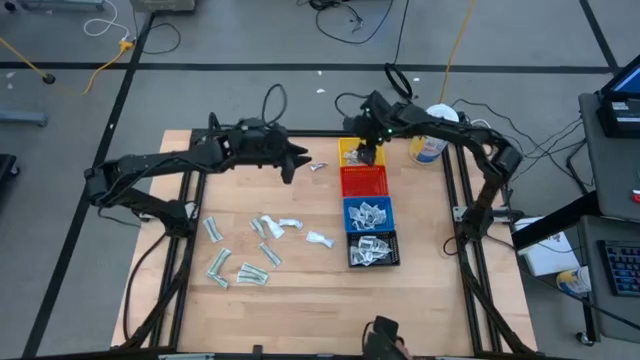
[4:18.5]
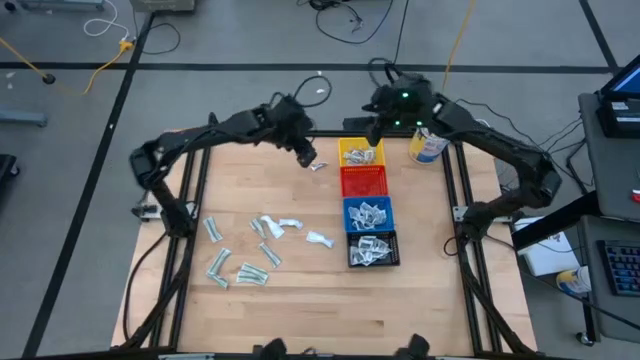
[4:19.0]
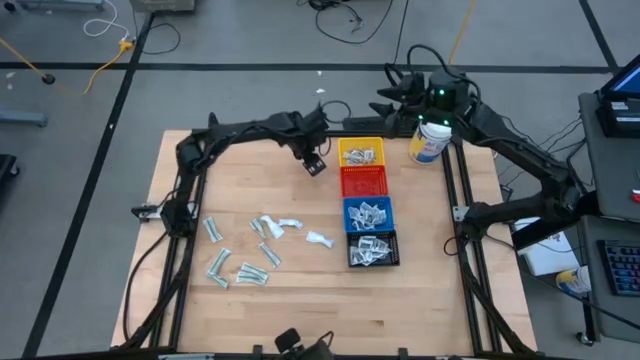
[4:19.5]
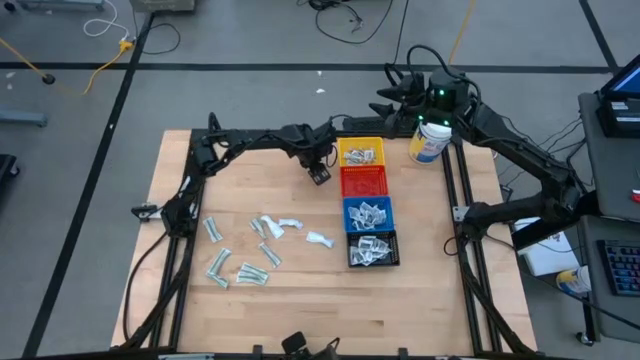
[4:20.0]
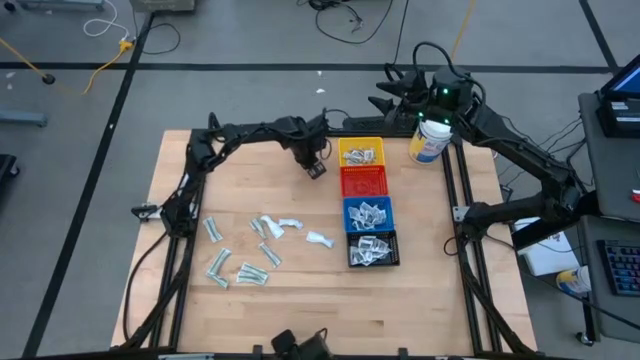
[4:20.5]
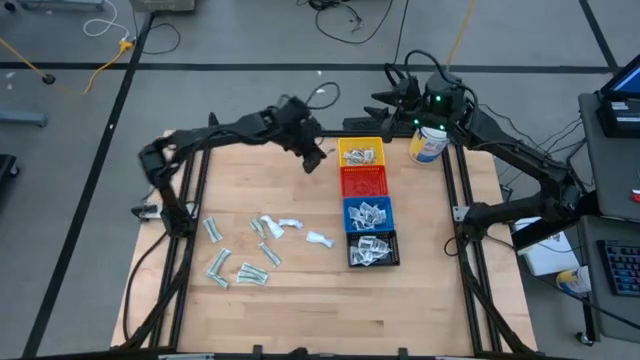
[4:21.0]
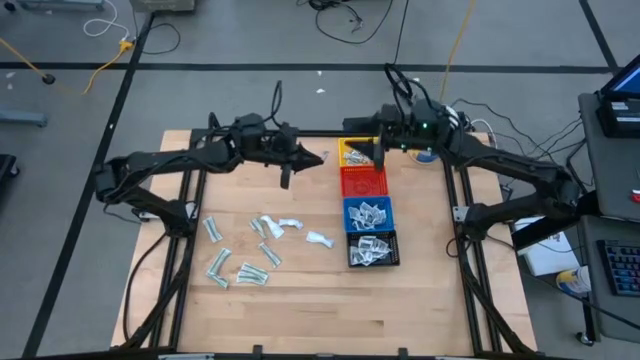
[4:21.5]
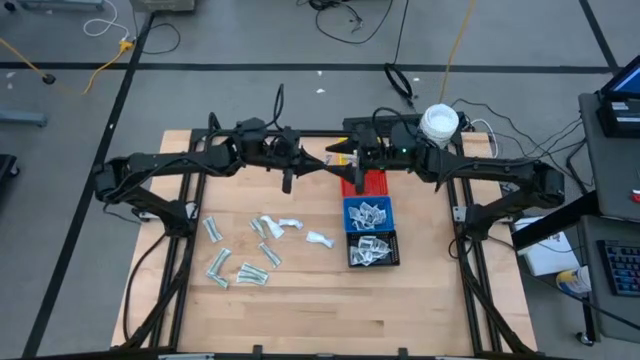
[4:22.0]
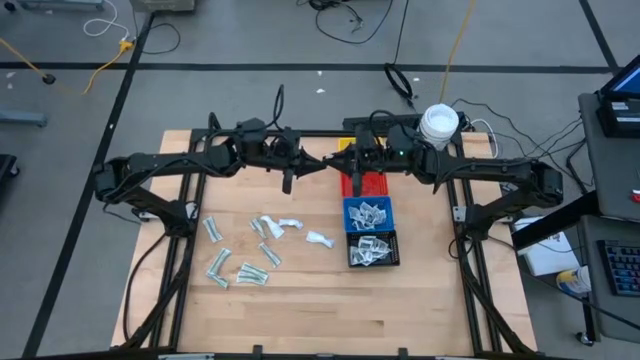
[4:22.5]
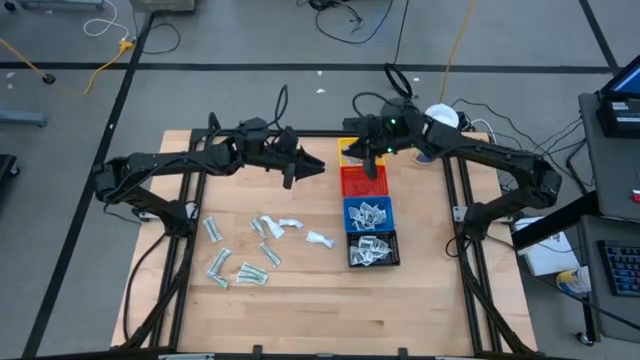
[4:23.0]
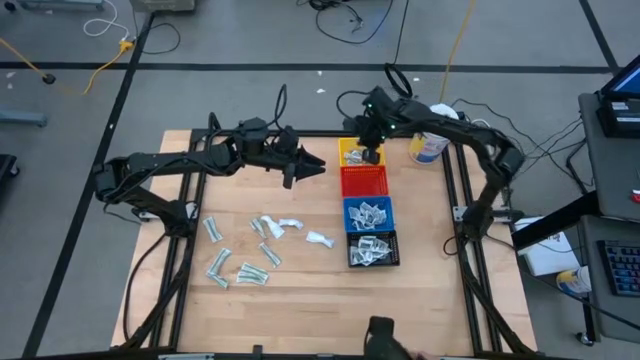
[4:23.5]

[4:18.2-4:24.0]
Task: Pick & Place First Aid Supplies
Put the orange ointment pack into the yellow bin

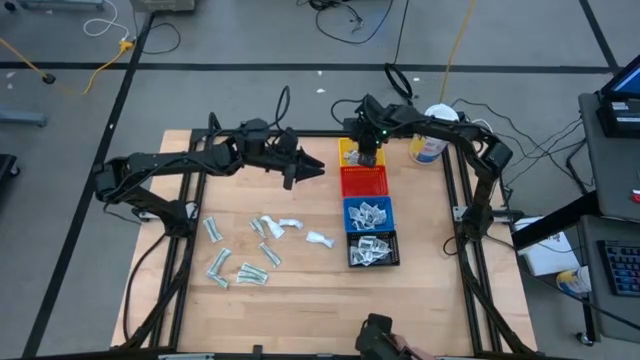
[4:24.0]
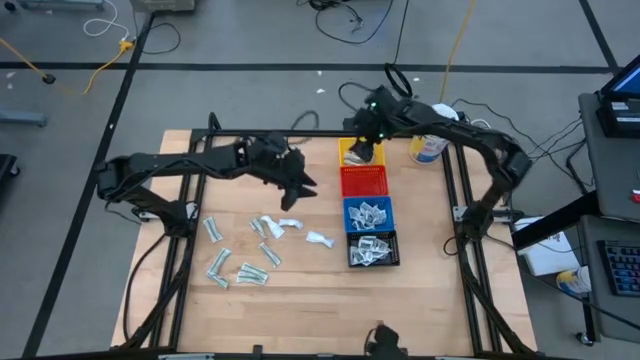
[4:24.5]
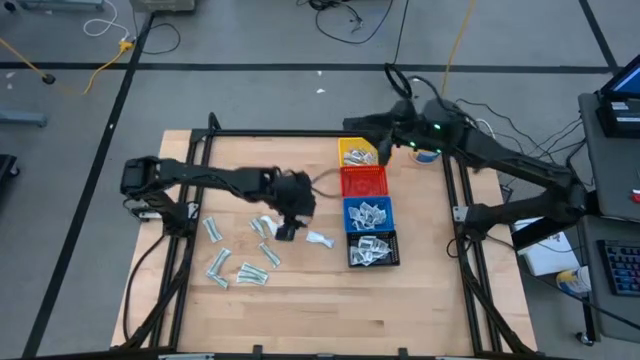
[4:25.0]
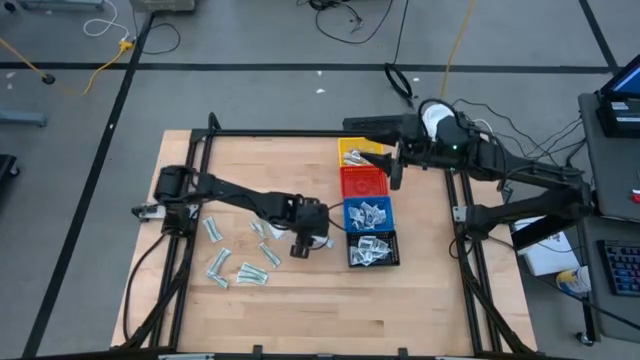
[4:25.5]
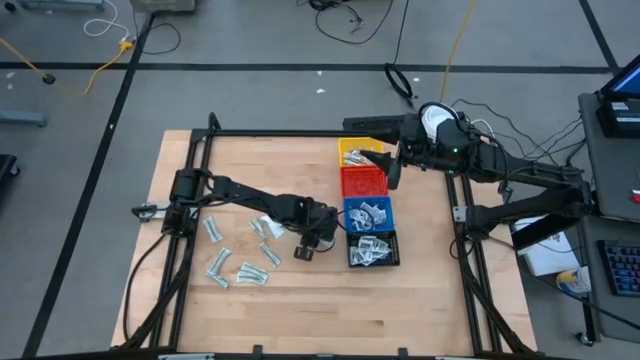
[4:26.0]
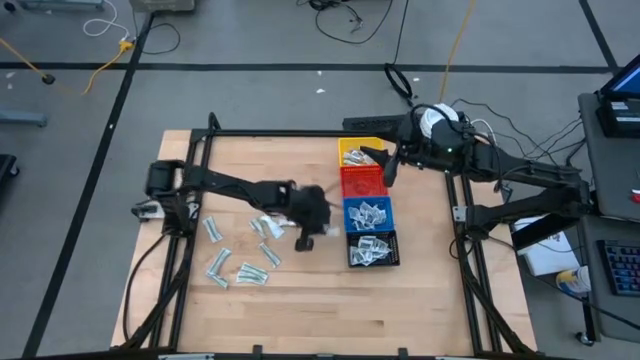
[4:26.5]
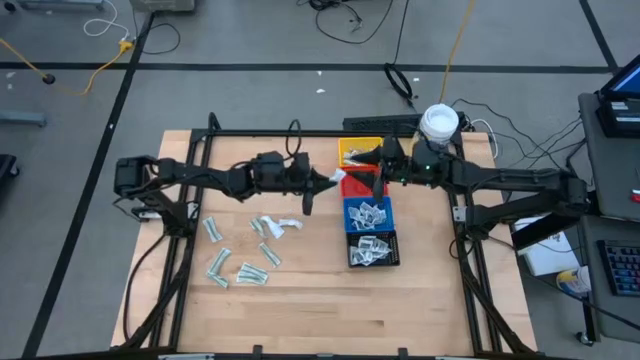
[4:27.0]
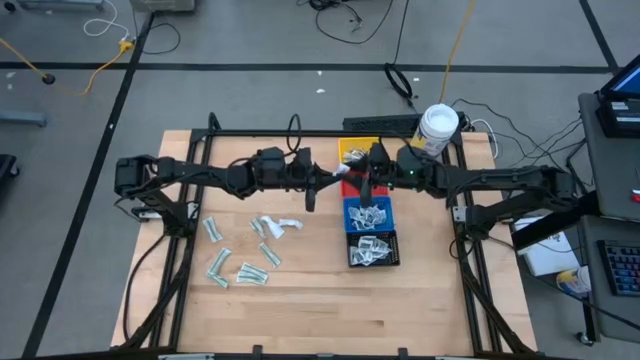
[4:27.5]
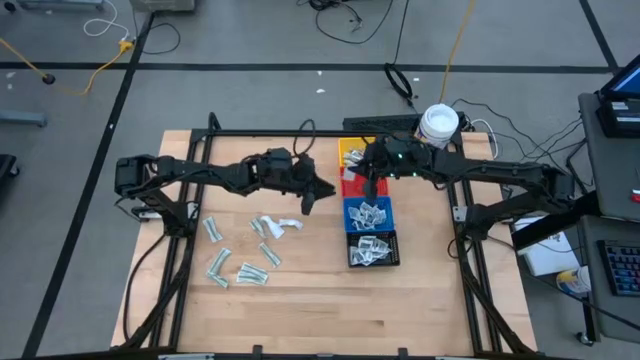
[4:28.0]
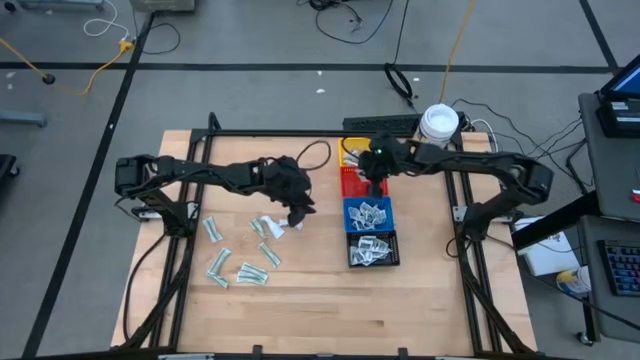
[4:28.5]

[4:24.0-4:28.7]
Put the green bandage pack into the red bin

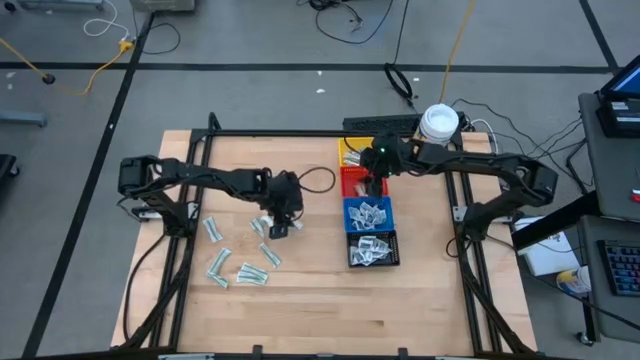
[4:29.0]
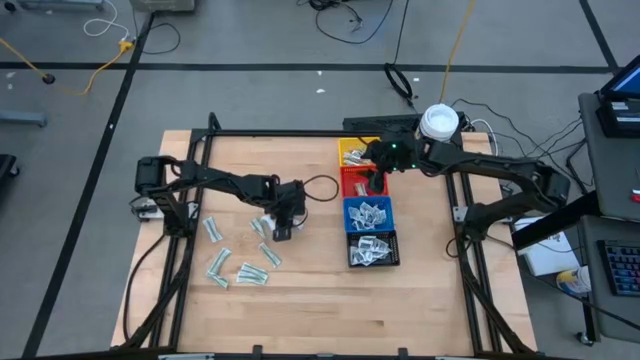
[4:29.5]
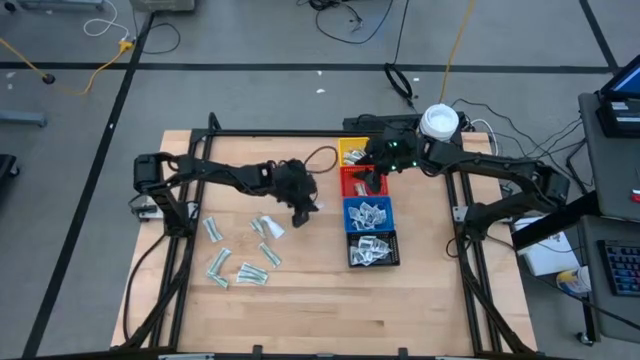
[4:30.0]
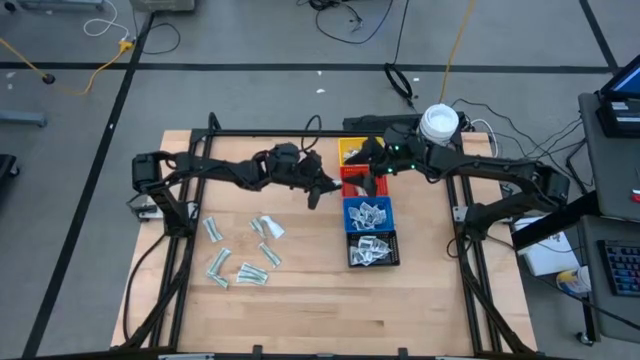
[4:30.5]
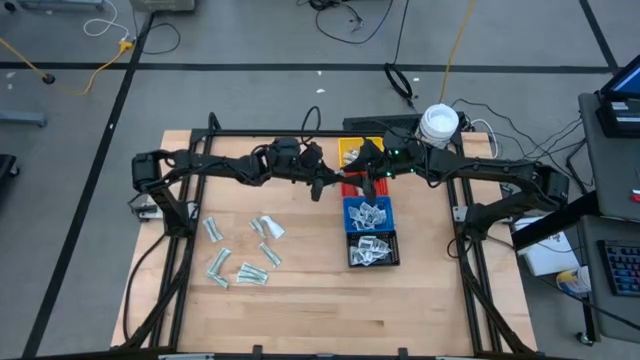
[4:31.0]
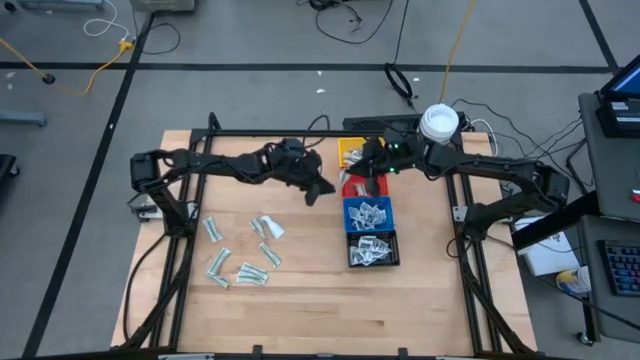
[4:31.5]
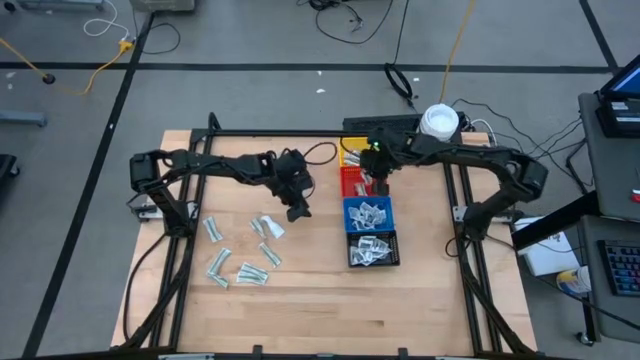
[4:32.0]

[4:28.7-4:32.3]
Put the green bandage pack into the red bin

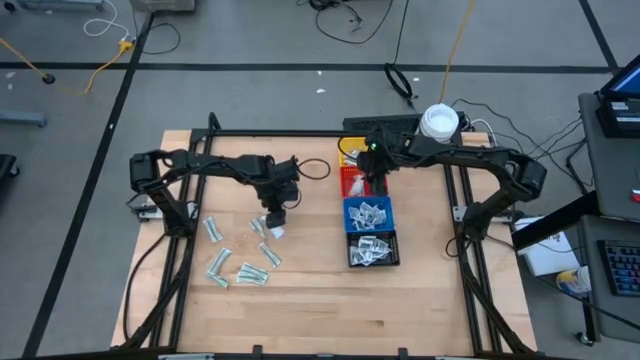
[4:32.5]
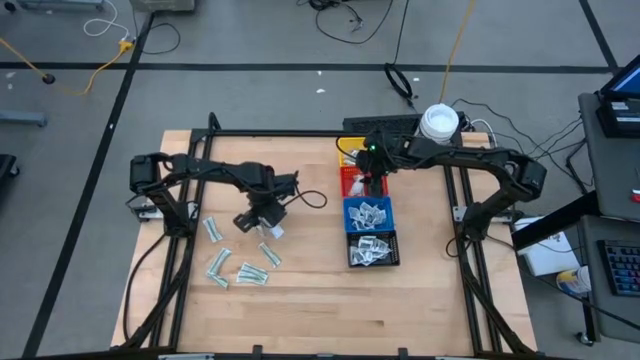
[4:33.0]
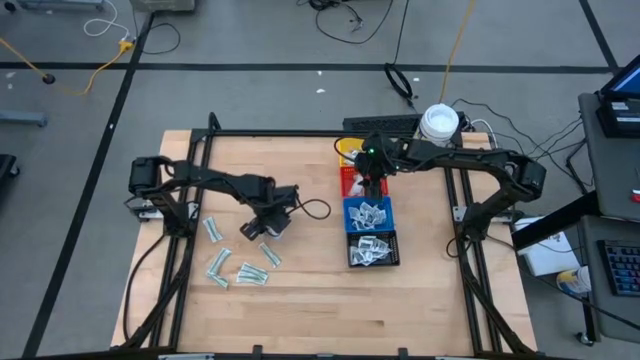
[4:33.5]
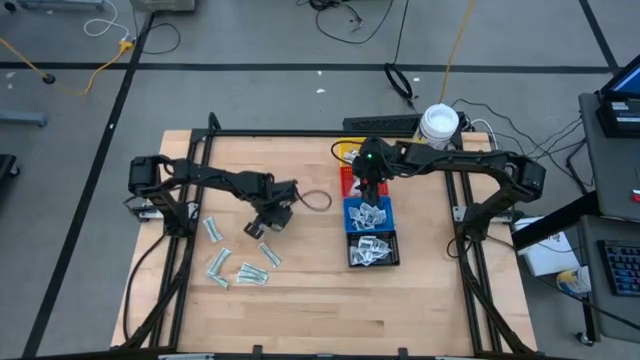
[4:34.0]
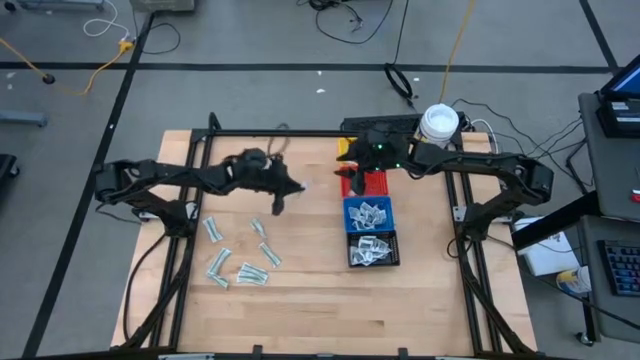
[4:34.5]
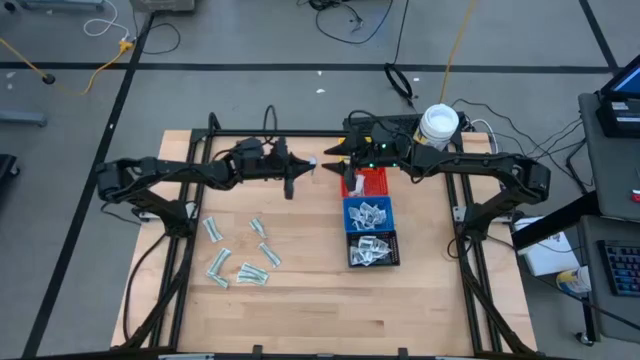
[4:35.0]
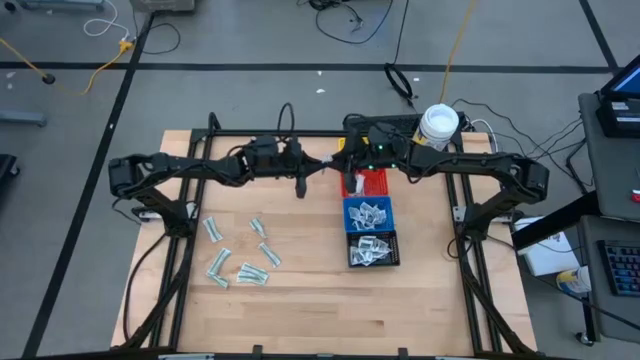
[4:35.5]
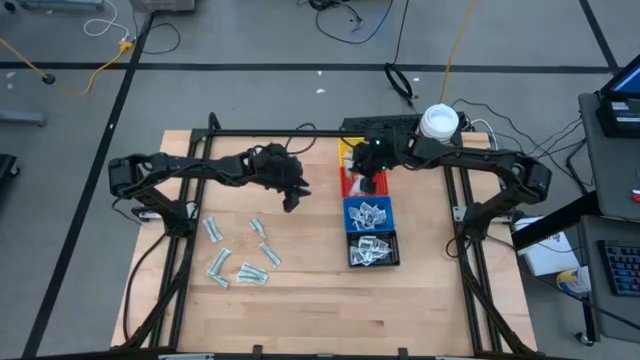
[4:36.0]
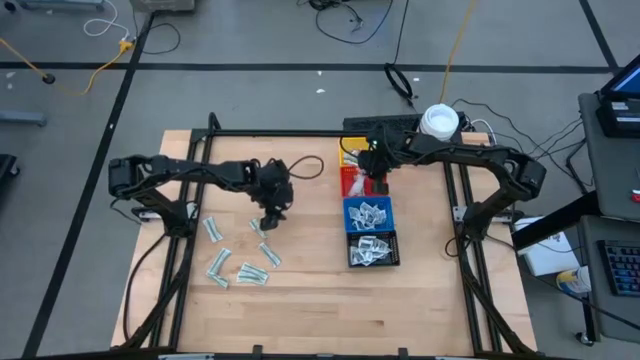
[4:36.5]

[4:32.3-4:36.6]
Put the green bandage pack into the red bin

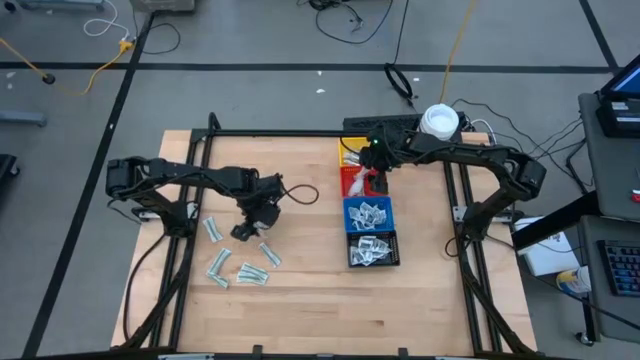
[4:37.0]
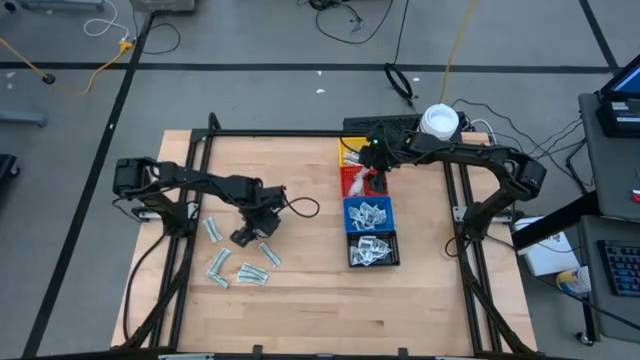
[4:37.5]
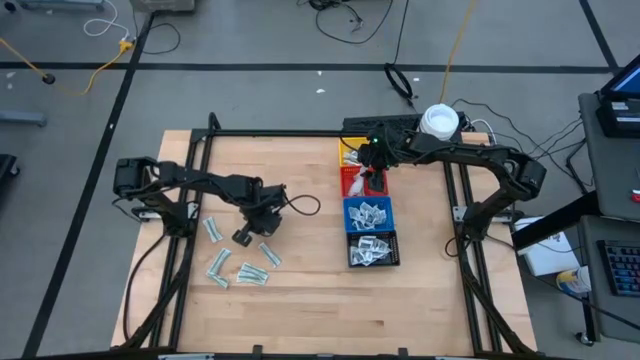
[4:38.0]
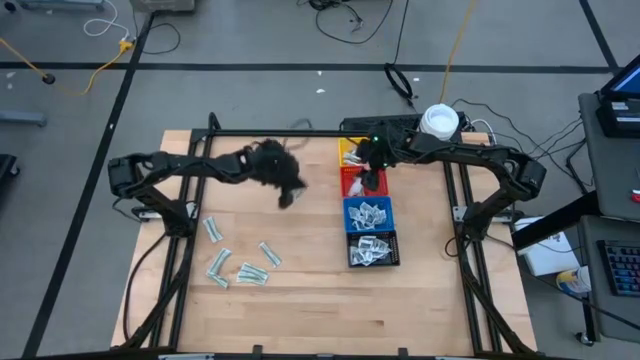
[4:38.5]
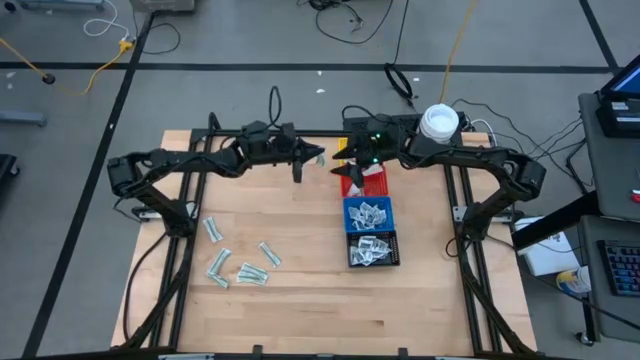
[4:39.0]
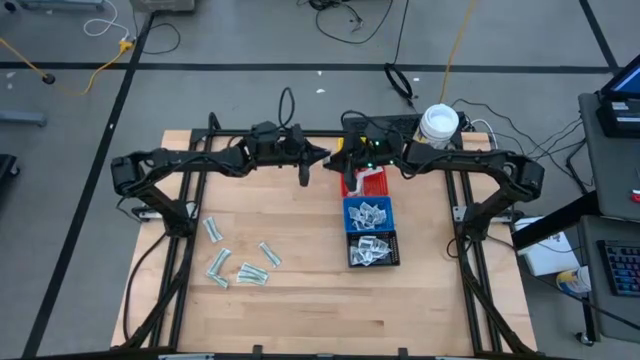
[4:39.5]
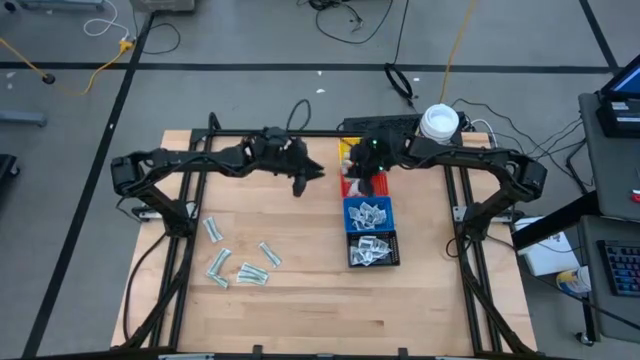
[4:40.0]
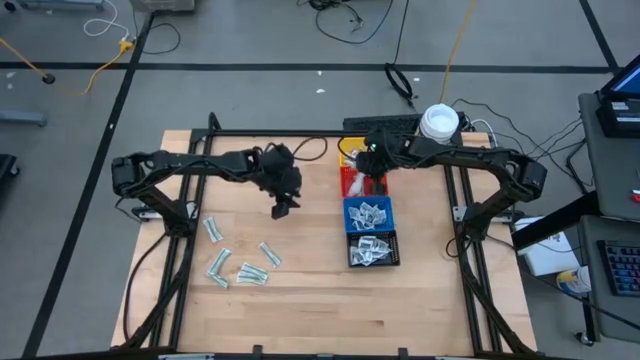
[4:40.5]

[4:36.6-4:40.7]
Put the green bandage pack into the red bin
